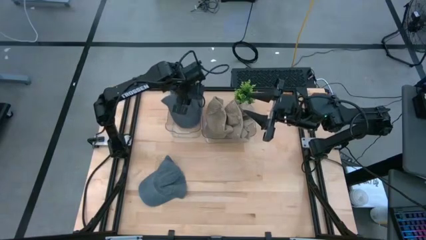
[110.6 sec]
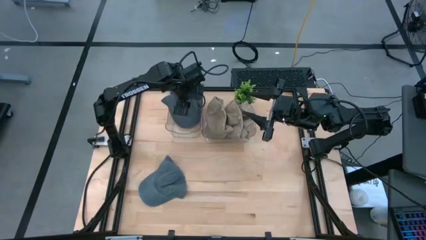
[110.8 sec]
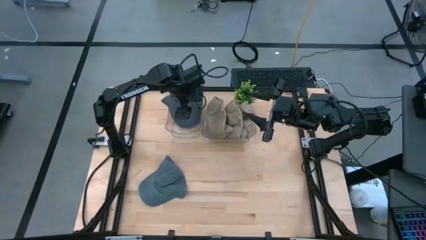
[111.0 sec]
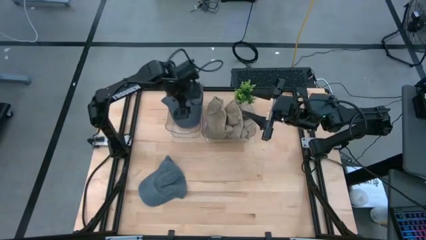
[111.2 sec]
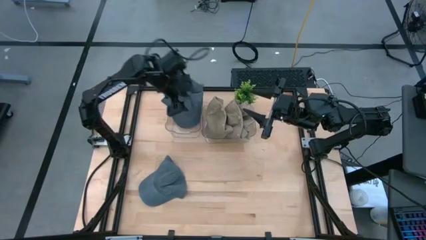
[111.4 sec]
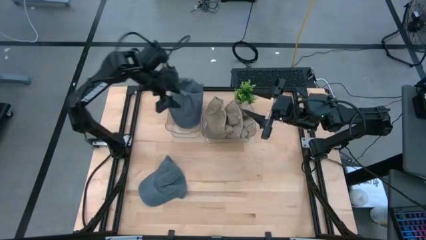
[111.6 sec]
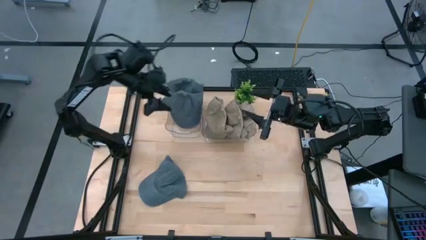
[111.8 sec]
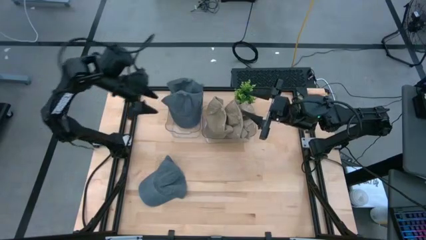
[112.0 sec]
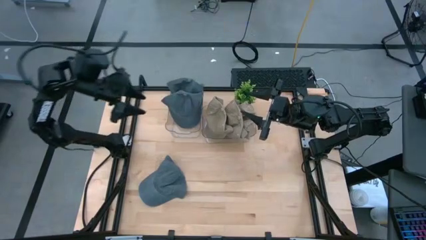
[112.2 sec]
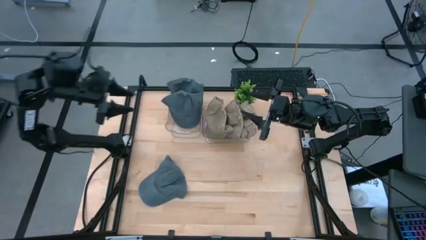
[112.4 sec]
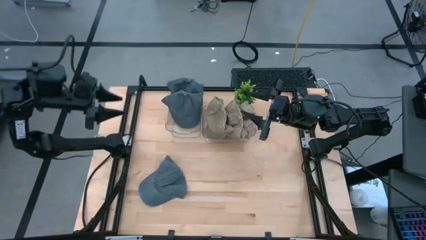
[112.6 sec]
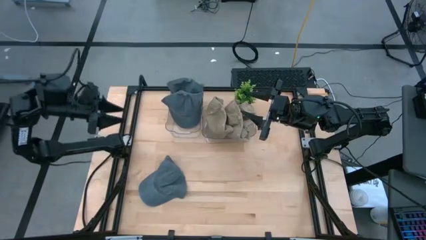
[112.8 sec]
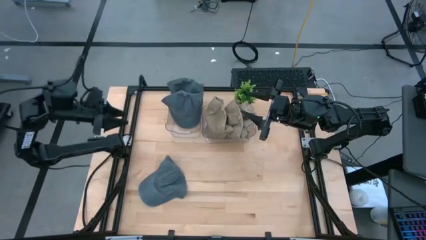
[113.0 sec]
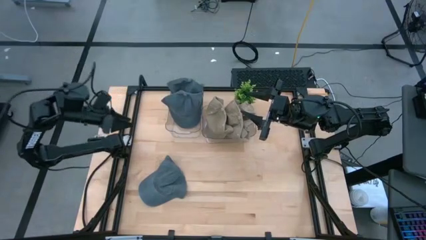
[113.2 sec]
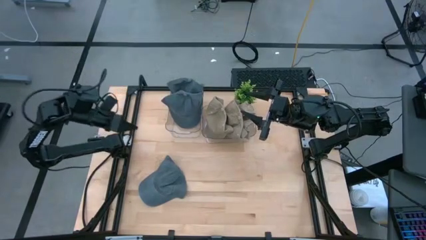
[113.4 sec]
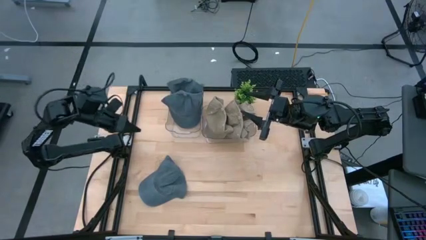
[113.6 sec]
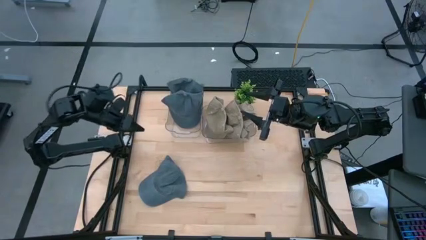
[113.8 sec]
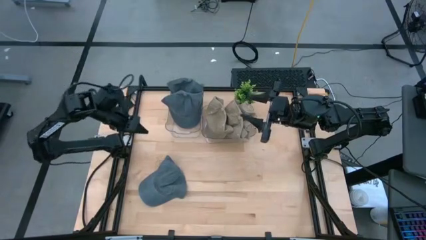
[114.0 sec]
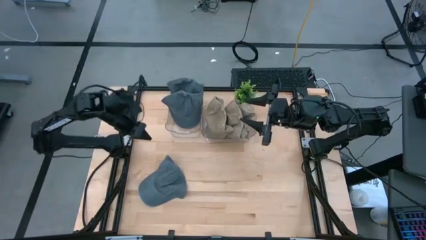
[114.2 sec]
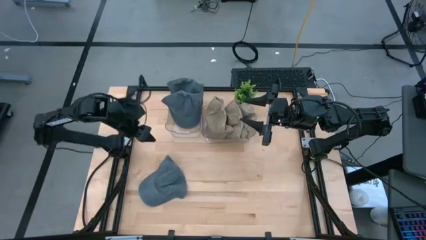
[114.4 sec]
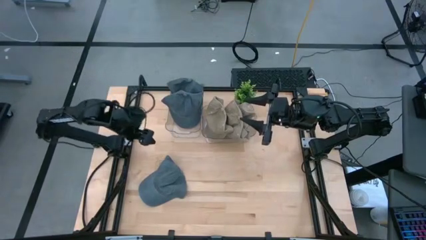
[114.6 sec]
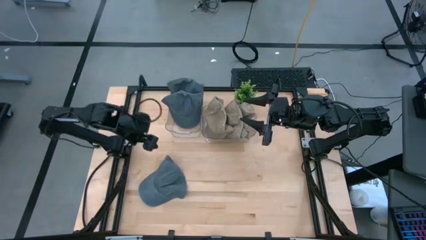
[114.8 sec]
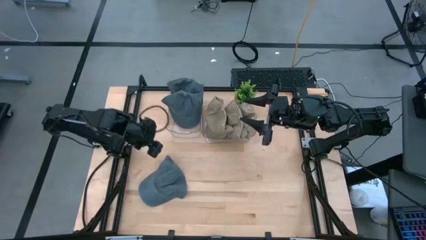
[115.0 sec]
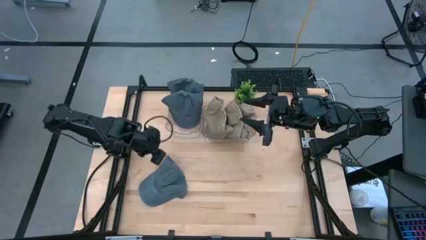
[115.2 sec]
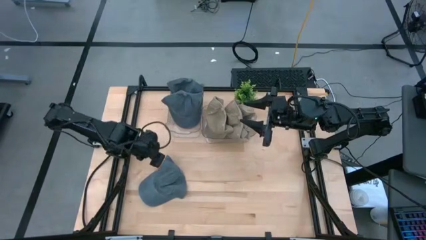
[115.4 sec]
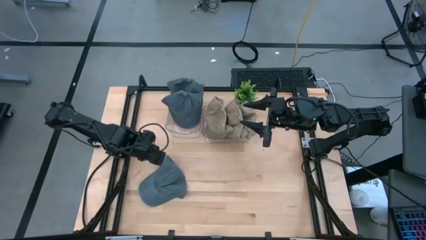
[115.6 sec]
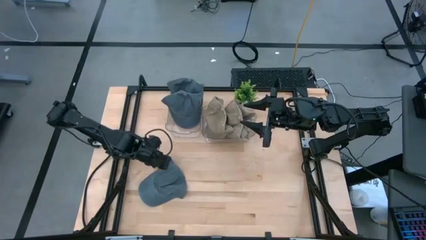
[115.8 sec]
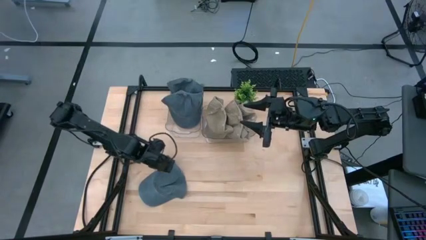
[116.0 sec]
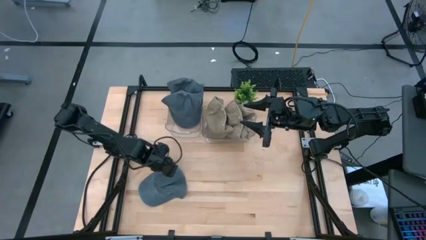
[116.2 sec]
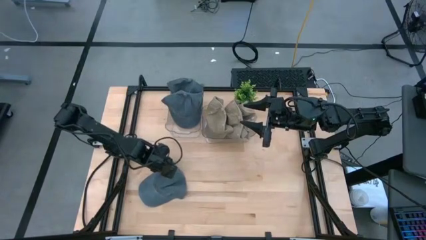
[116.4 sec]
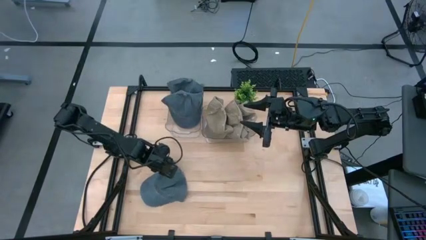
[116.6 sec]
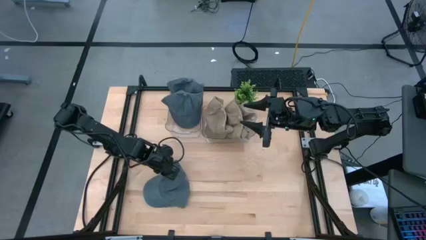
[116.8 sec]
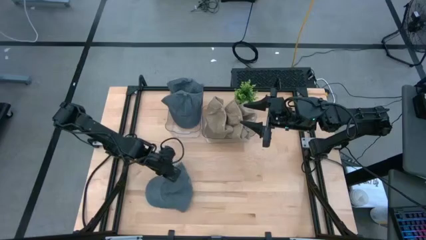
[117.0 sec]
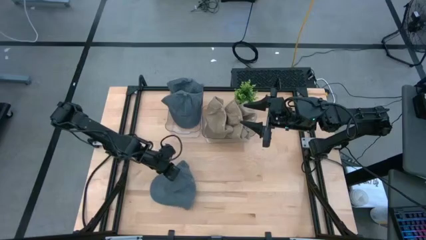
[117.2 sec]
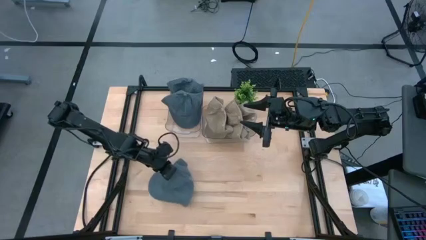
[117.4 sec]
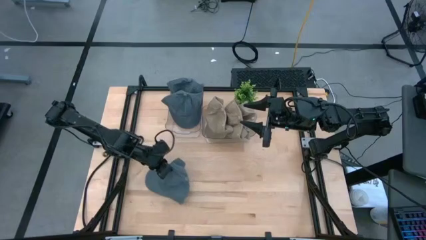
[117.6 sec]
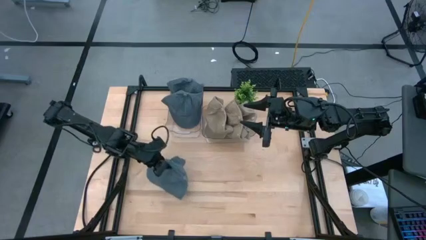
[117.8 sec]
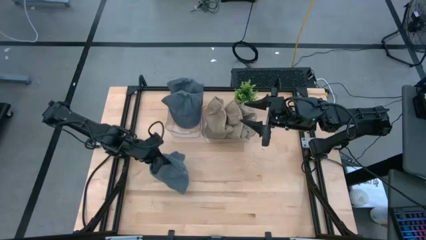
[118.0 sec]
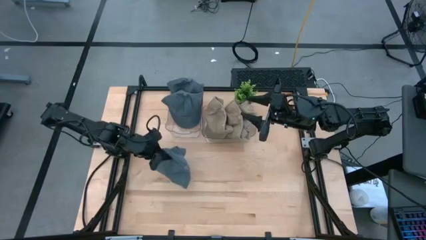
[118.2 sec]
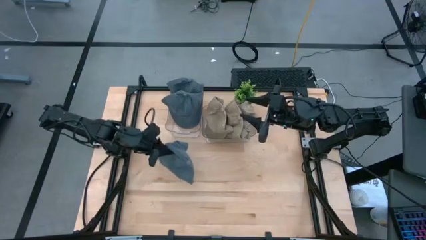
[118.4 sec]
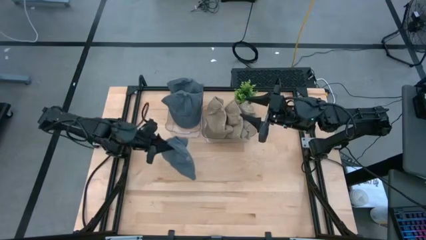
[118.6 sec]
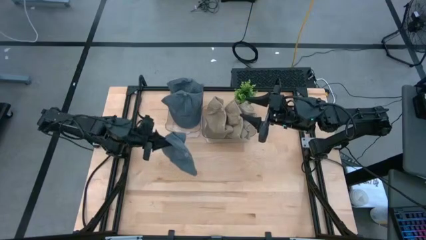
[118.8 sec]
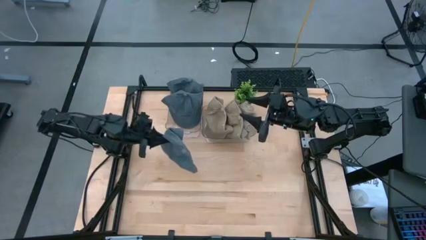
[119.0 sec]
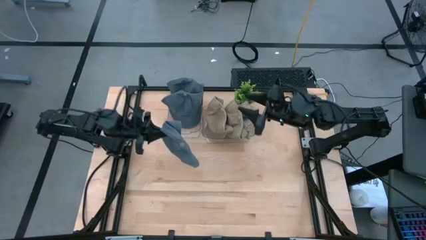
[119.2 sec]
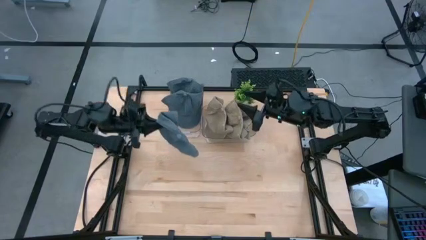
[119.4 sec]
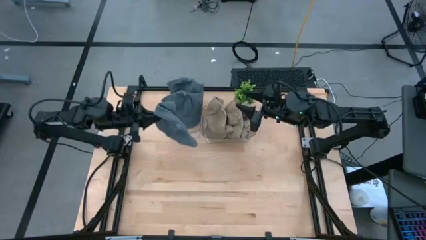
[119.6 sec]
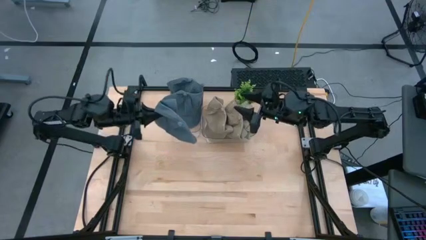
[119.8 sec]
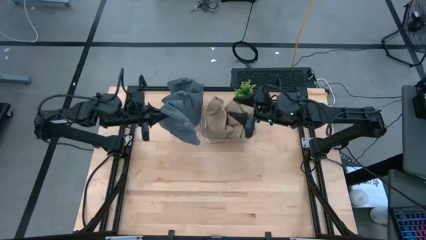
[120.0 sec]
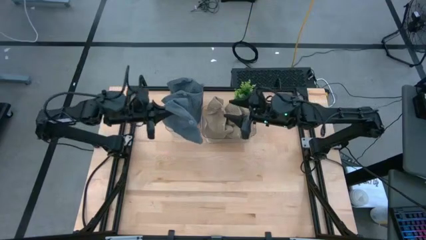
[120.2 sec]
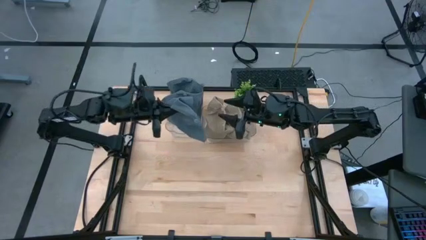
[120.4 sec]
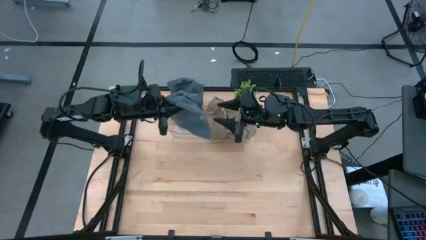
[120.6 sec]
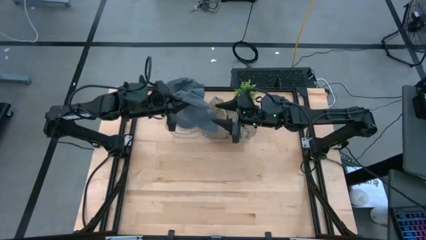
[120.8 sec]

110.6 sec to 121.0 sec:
Task: Pick & Place hat
Put the blue cap into the left transparent bin
